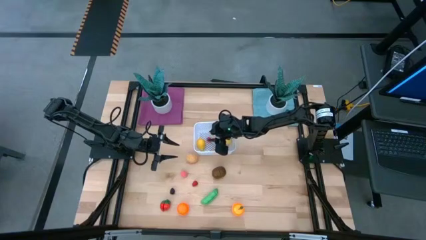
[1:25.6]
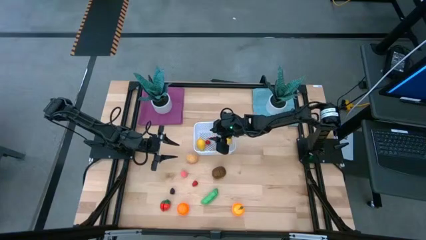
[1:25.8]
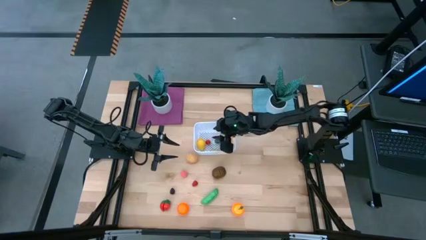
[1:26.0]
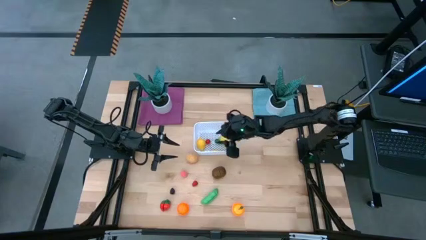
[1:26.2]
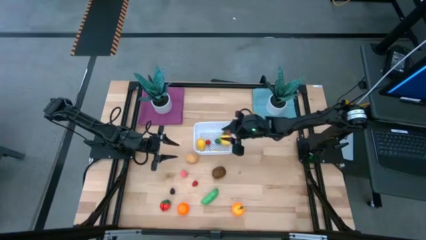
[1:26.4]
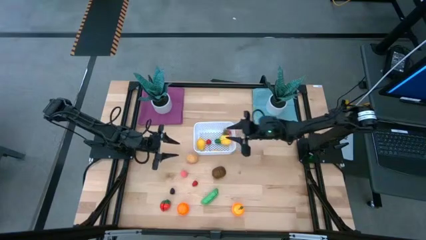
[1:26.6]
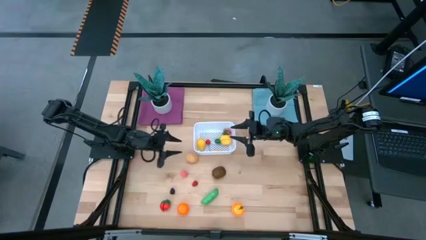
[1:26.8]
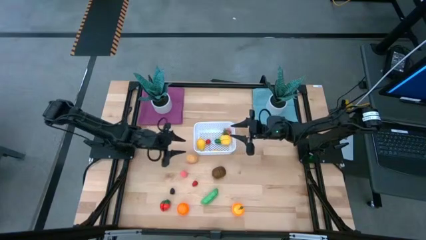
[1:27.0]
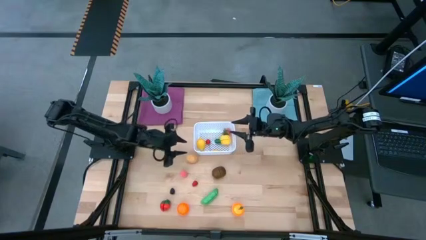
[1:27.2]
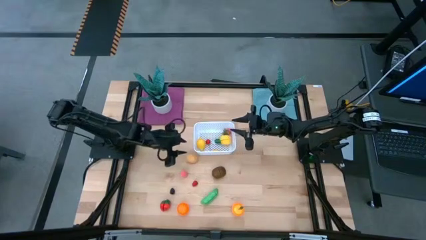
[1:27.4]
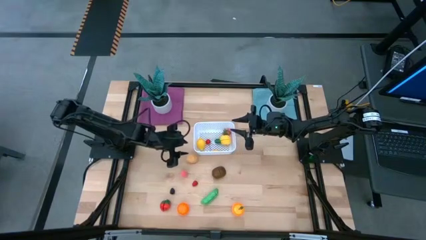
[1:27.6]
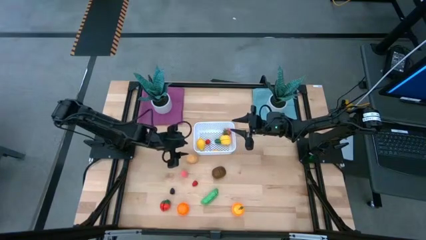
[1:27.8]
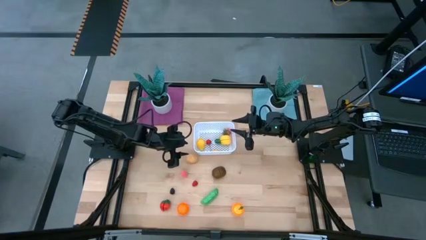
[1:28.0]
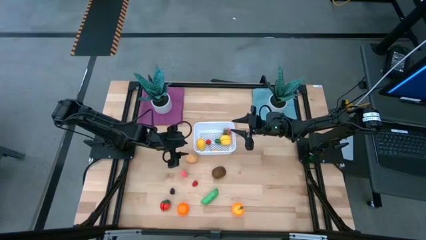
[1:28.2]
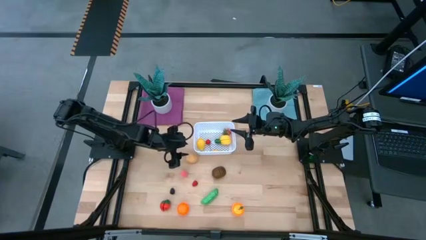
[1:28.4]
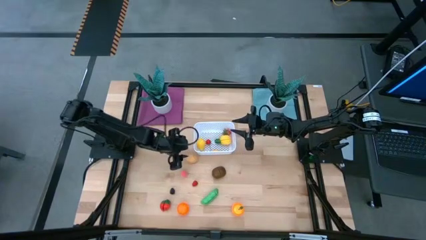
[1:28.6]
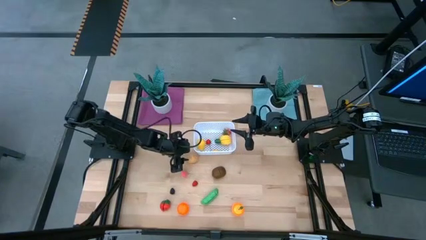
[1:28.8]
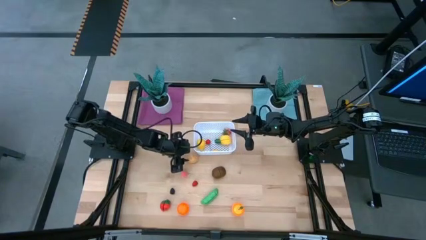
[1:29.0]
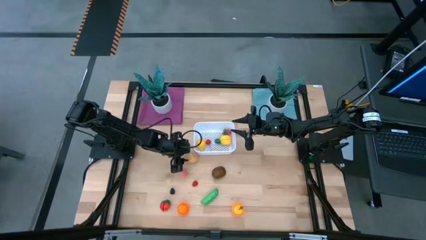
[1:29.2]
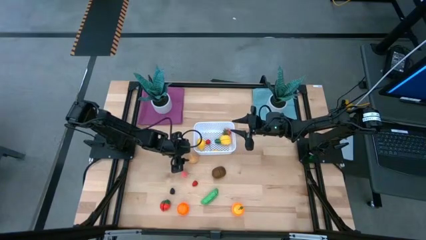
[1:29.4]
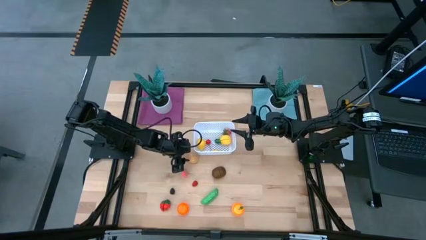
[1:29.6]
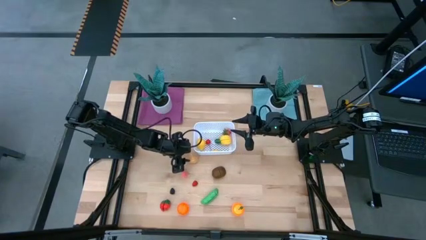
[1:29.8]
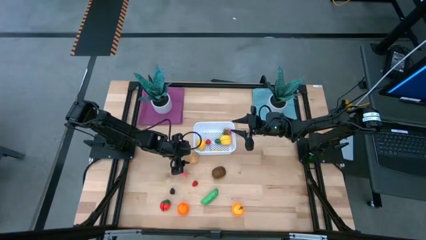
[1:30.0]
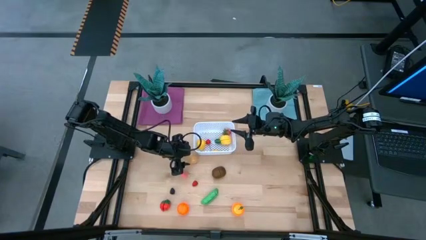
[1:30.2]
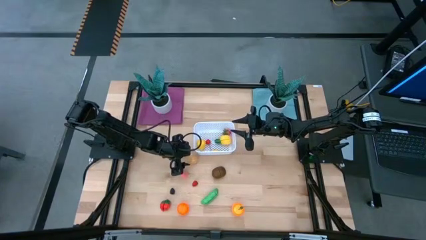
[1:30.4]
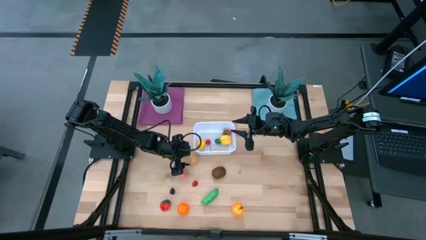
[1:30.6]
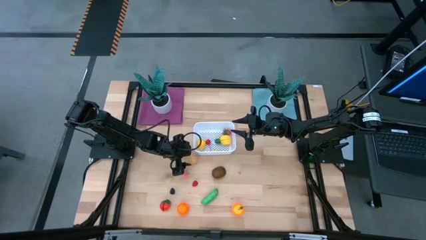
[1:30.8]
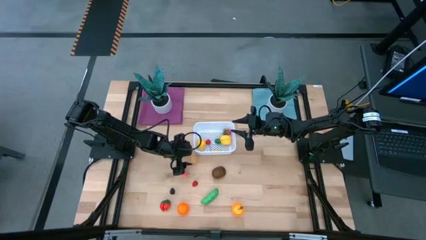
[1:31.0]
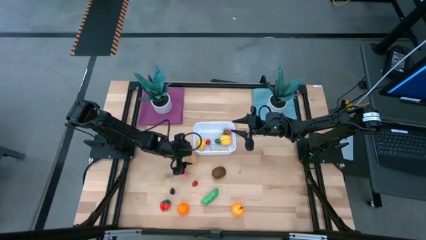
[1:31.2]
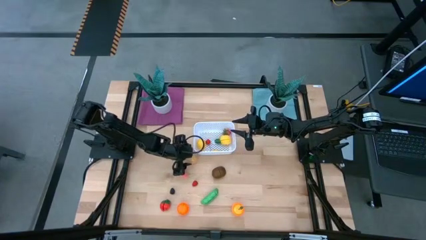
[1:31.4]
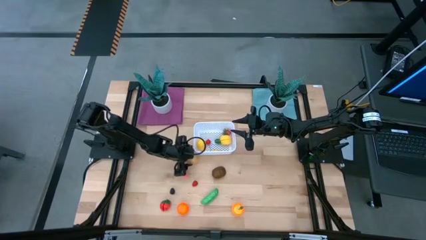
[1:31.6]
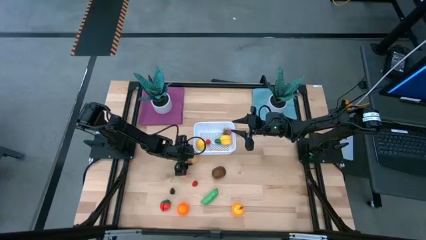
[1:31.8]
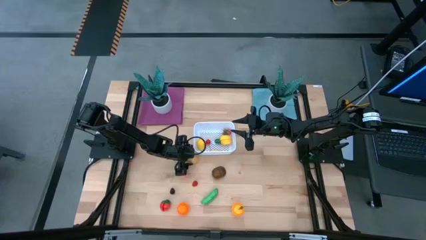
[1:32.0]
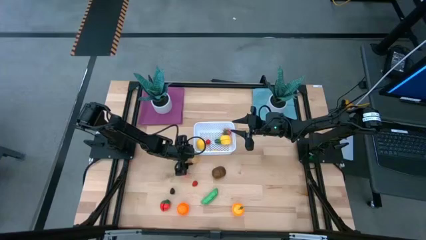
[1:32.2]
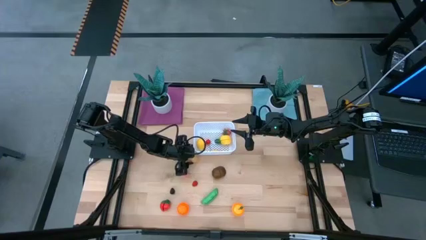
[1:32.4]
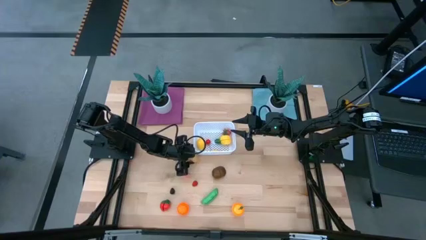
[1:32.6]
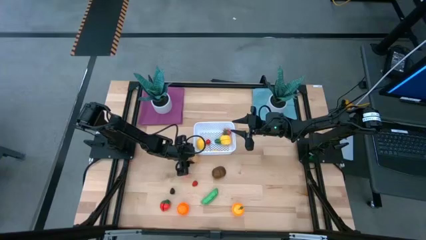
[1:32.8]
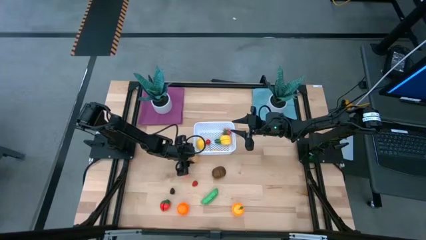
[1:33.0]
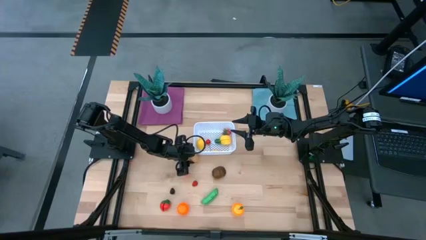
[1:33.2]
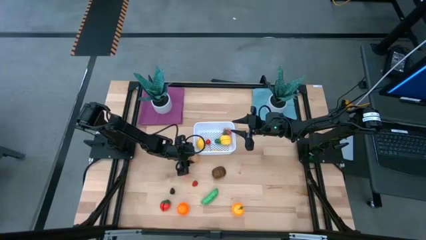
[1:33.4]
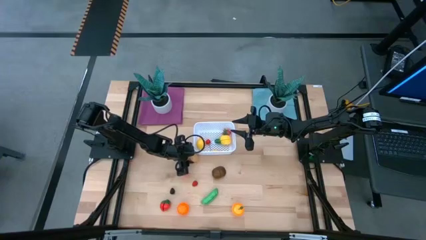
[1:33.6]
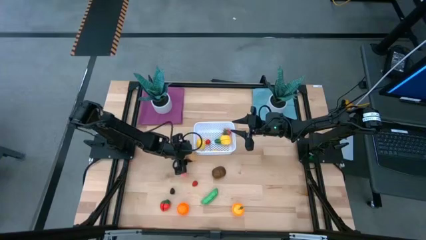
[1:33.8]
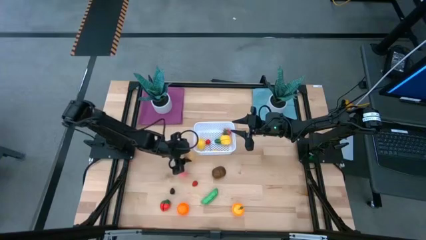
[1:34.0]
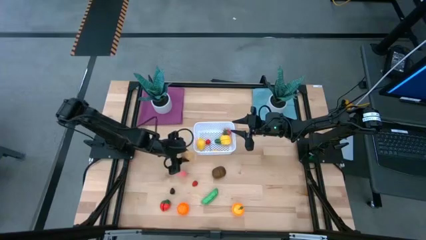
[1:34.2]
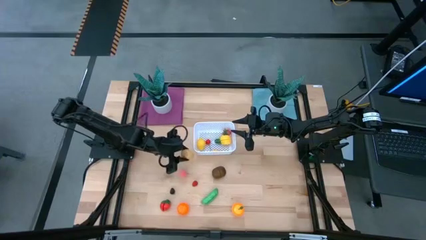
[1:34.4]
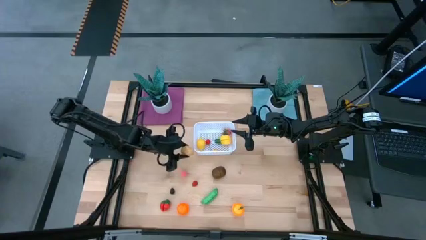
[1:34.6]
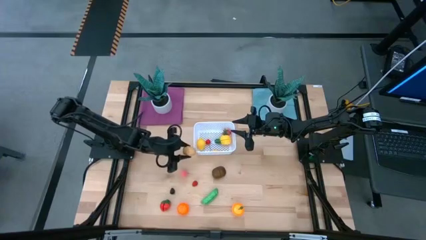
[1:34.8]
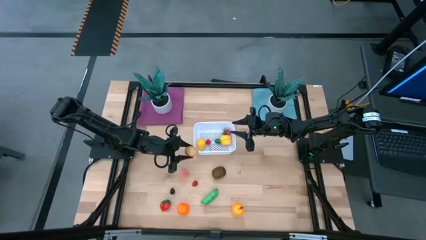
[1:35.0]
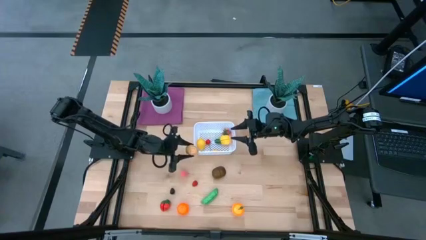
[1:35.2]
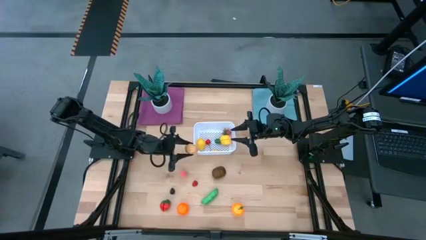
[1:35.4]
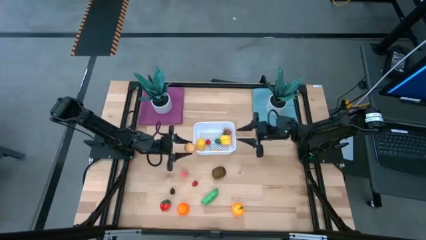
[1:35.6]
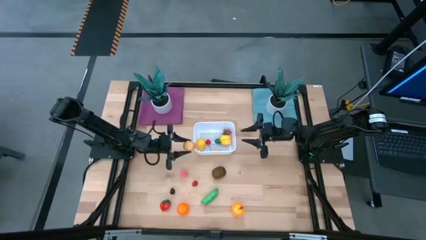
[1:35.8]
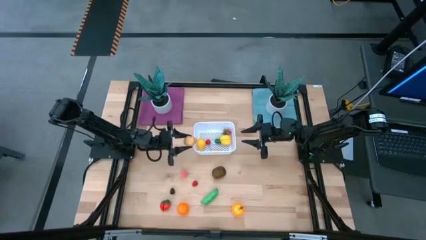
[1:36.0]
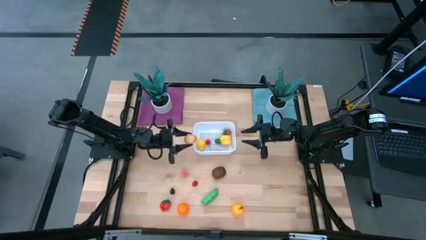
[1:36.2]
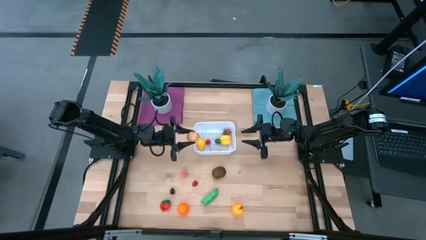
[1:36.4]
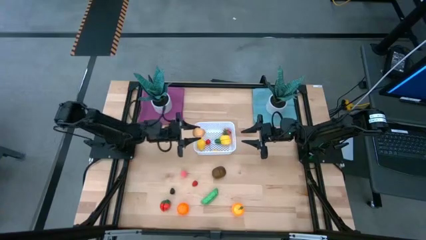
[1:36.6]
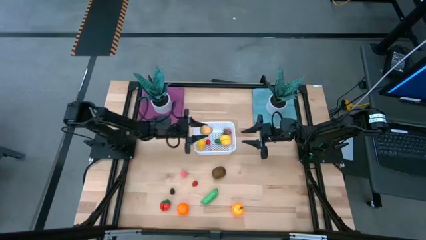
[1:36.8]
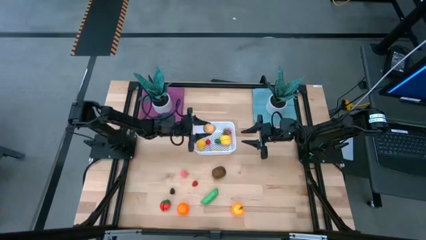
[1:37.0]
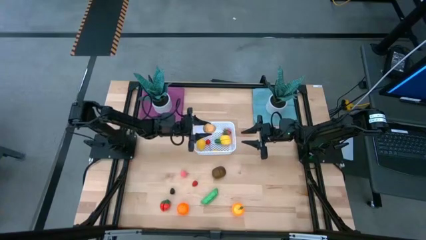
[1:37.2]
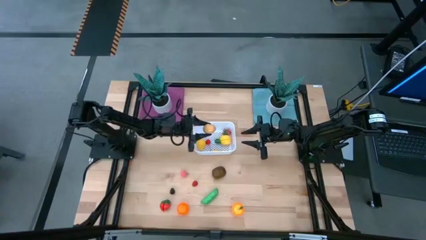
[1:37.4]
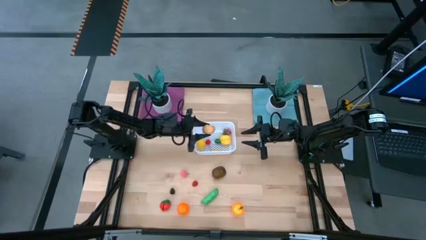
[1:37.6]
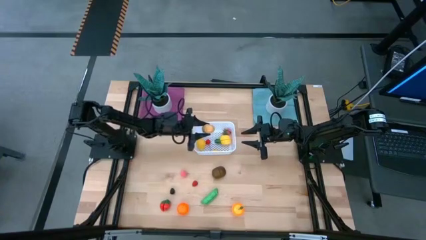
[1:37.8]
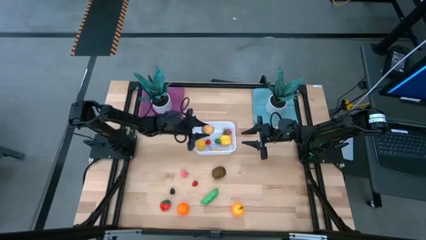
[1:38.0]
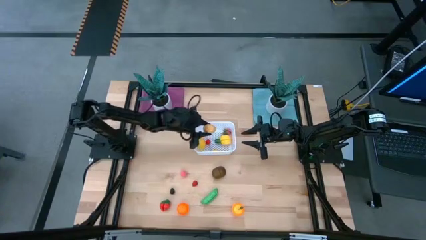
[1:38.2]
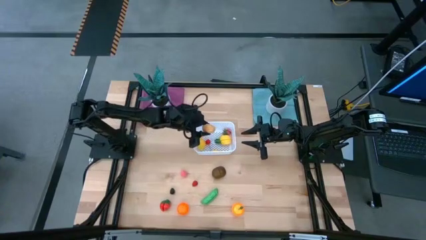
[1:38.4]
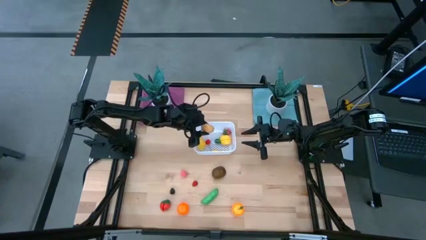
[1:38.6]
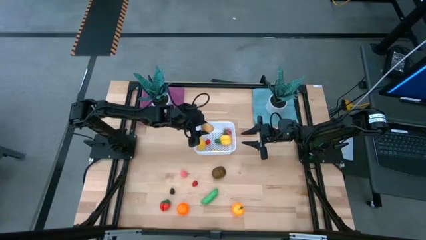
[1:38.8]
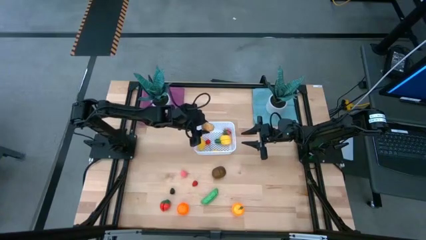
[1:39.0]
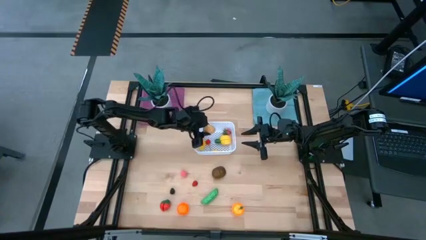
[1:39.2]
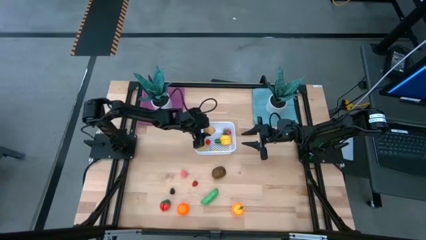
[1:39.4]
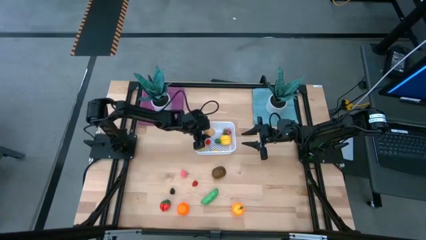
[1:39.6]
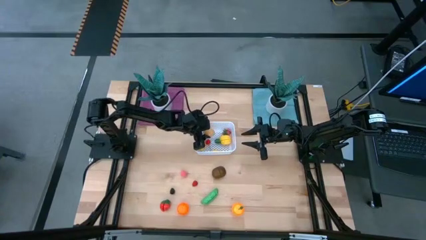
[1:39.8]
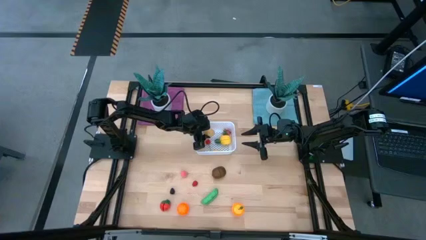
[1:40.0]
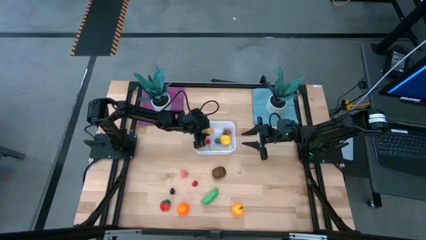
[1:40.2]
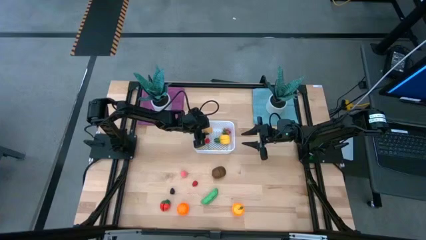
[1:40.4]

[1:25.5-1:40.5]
Task: Pick and placing Produce into tupperware
Put the brown potato into the white bin
